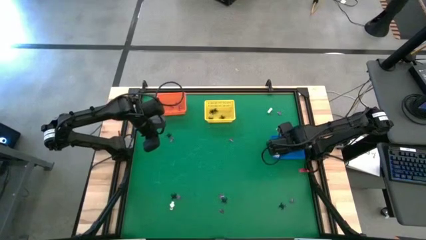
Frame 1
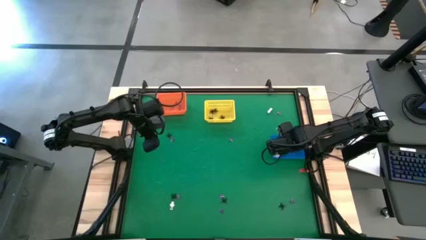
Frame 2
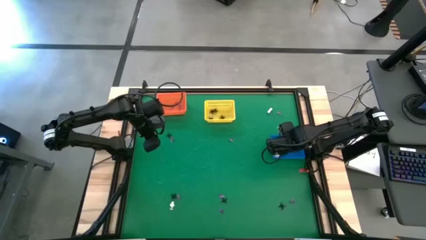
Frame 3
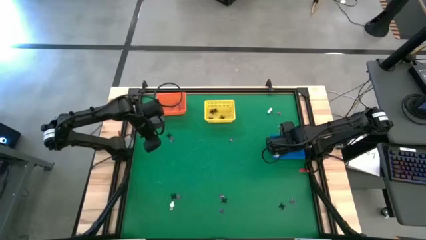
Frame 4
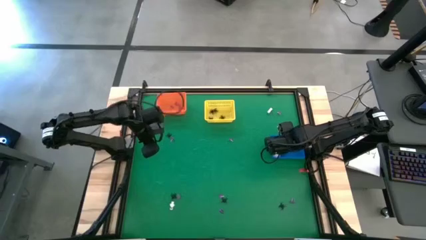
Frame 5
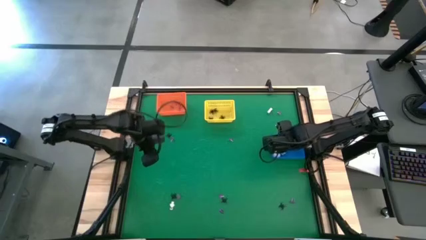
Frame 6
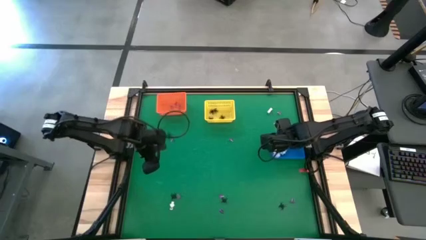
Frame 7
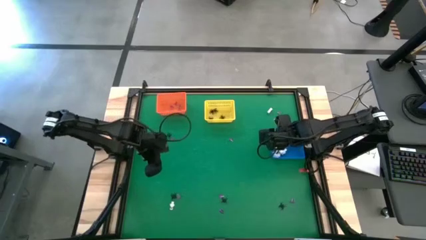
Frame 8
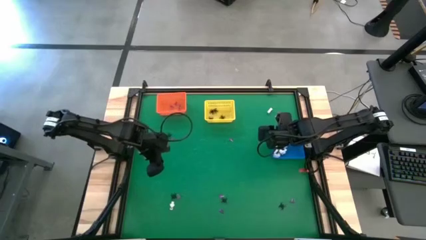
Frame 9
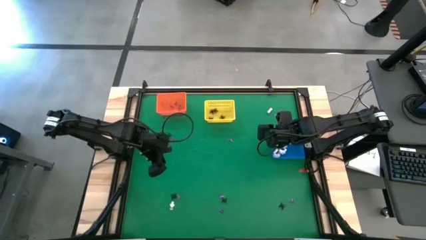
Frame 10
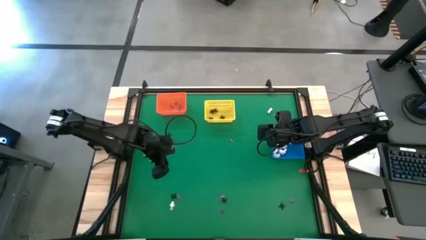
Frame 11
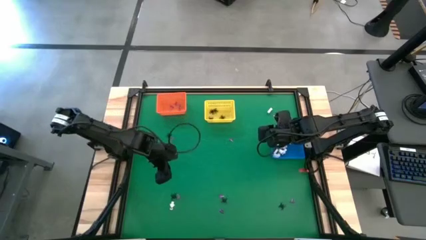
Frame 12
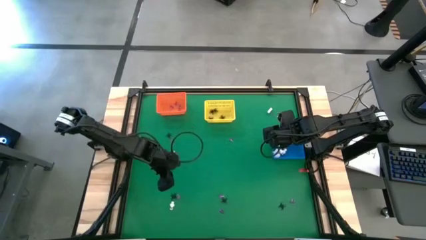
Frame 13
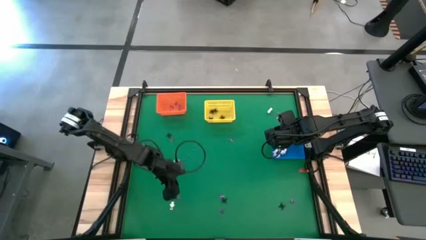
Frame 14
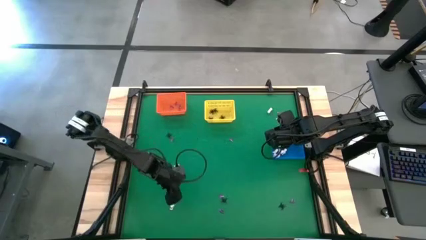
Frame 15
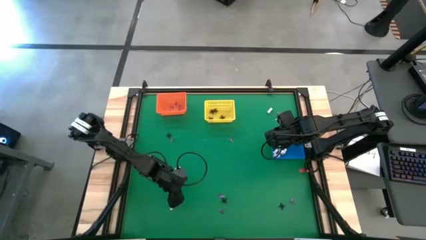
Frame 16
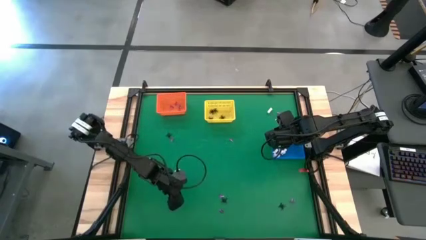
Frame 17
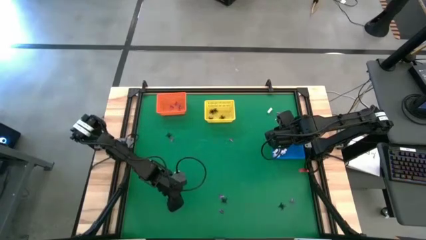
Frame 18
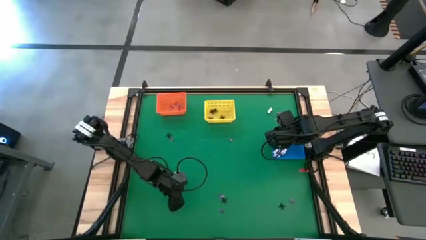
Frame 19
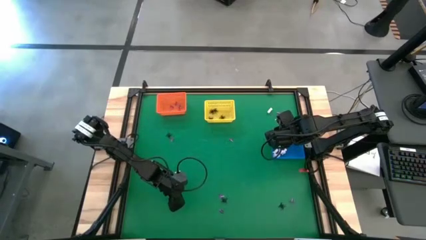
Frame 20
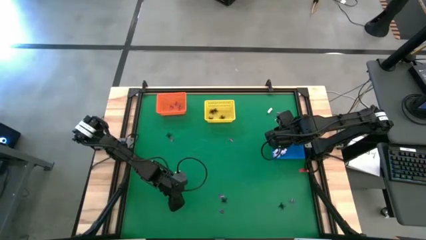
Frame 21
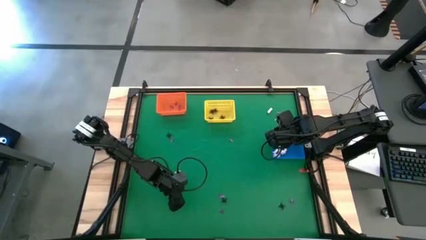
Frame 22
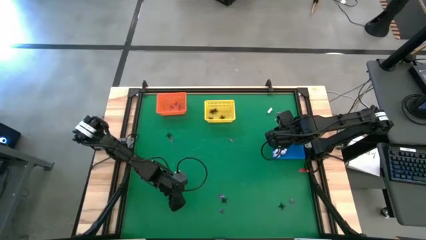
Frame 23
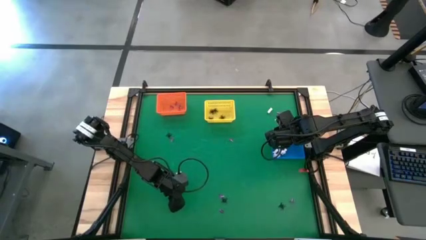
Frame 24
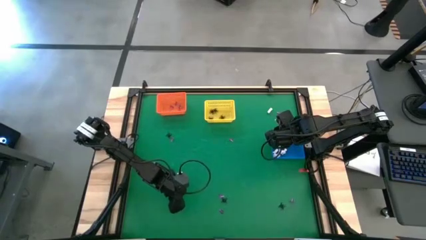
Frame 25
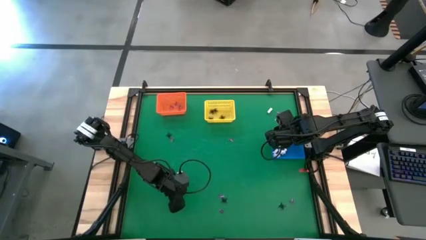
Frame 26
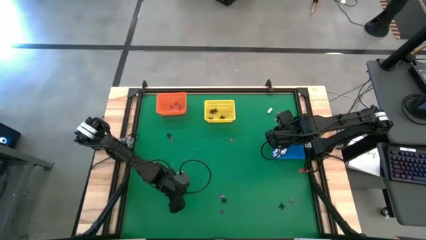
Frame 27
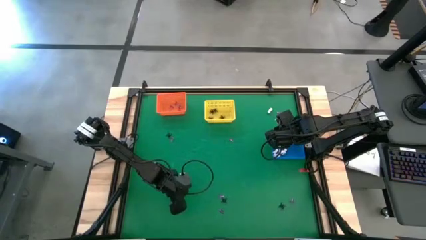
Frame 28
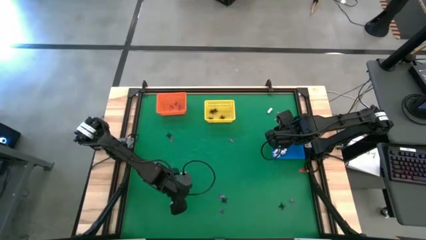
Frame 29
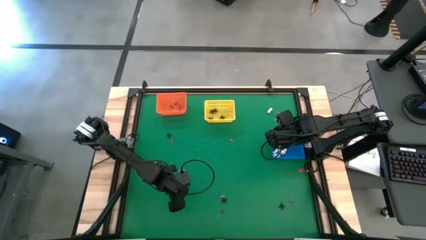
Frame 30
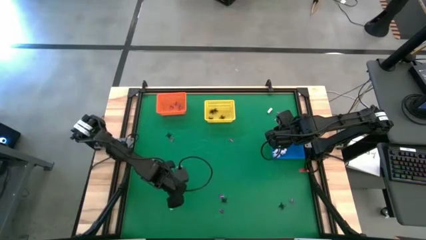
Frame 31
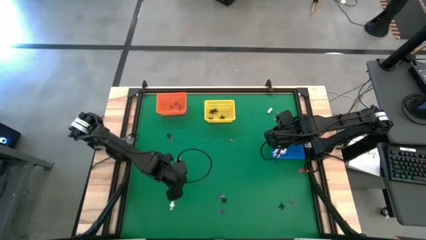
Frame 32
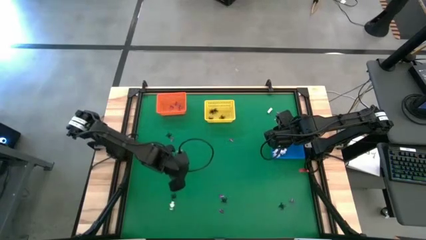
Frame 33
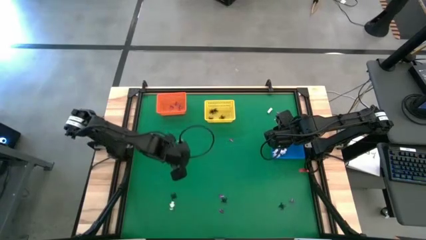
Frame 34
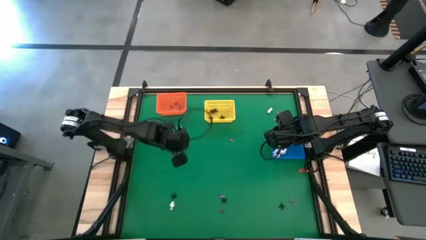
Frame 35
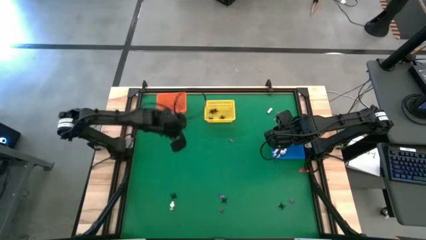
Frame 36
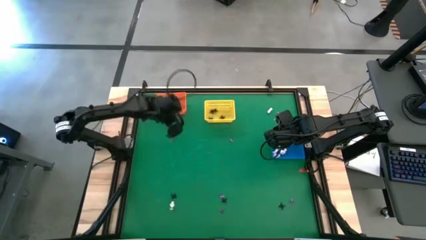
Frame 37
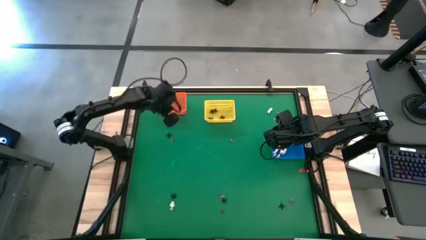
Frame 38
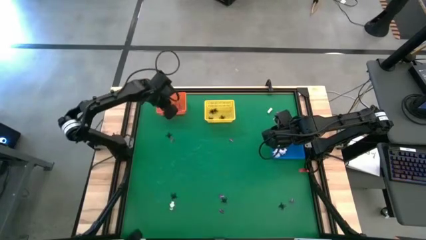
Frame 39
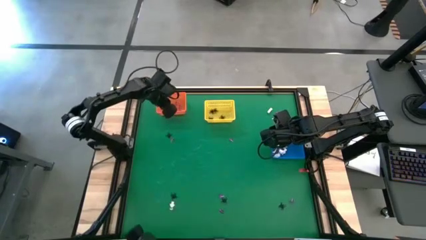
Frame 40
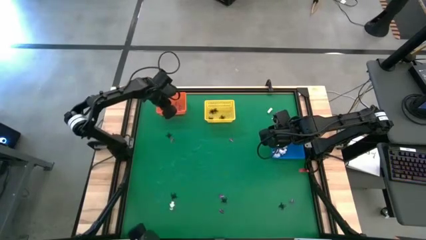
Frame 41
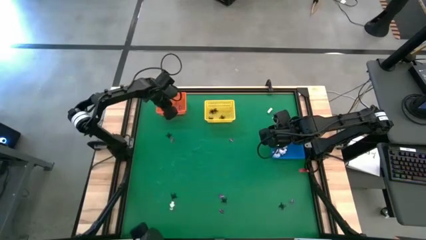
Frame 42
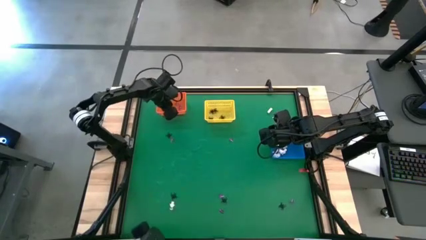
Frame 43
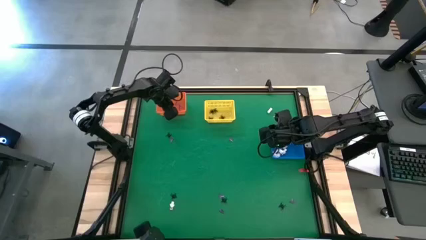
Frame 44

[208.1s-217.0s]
Task: Sort Halloween decoration
Put the violet skeleton toy into the orange basket

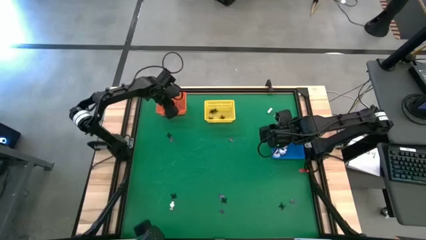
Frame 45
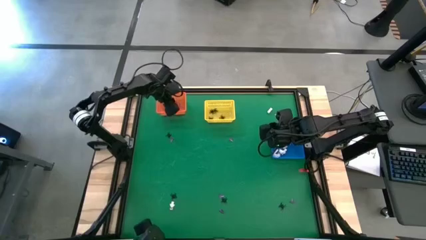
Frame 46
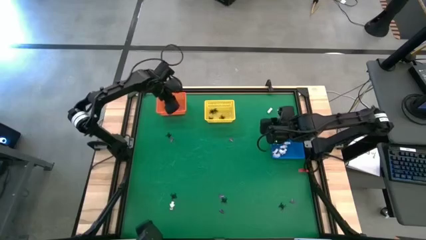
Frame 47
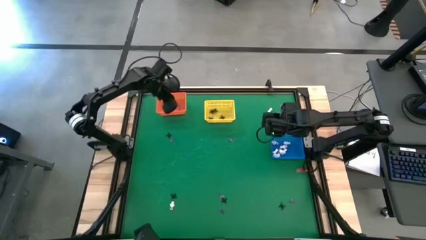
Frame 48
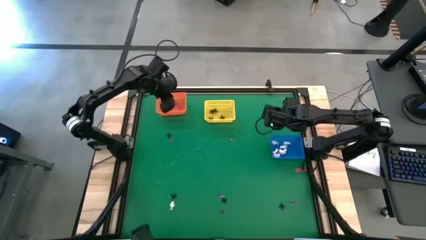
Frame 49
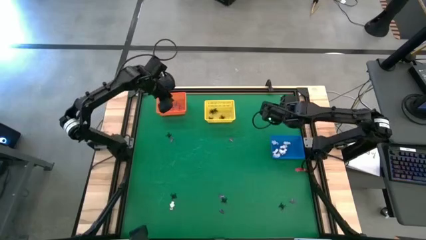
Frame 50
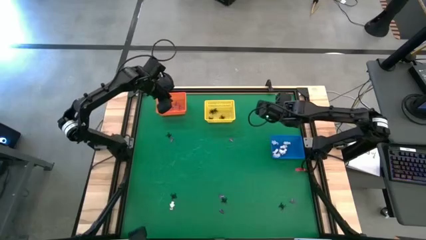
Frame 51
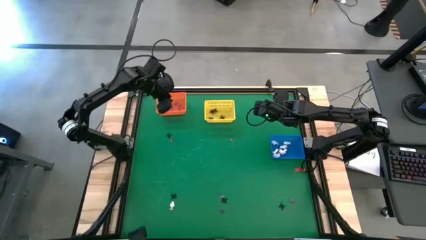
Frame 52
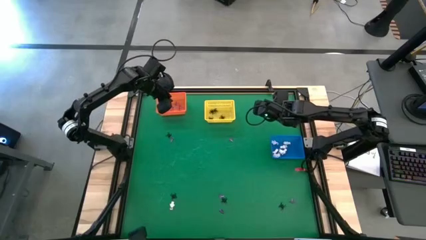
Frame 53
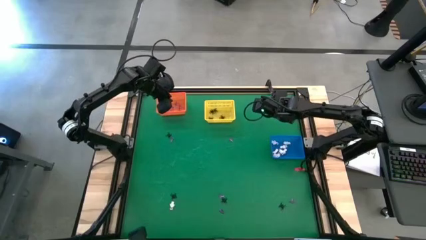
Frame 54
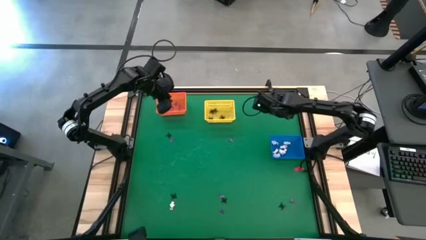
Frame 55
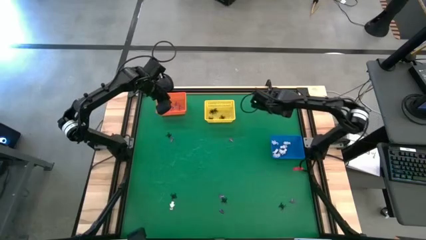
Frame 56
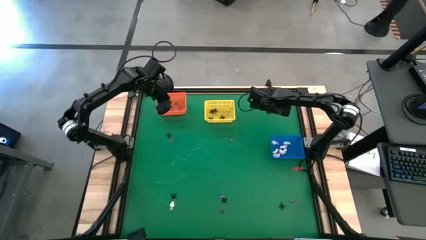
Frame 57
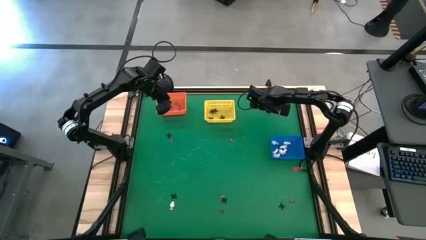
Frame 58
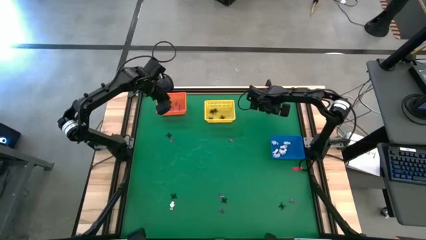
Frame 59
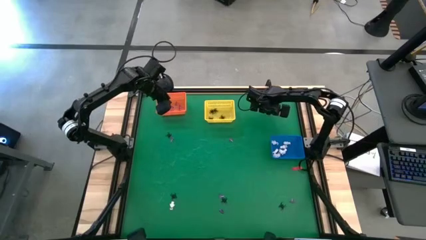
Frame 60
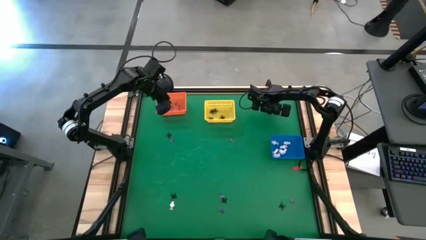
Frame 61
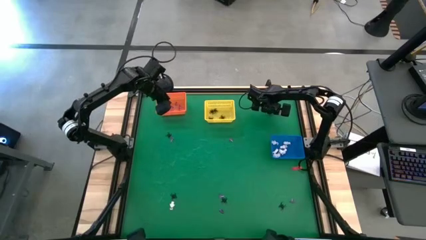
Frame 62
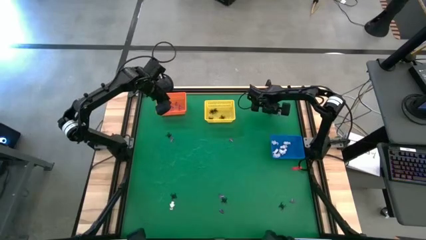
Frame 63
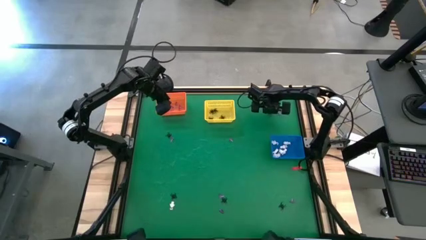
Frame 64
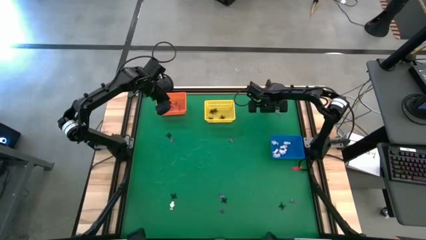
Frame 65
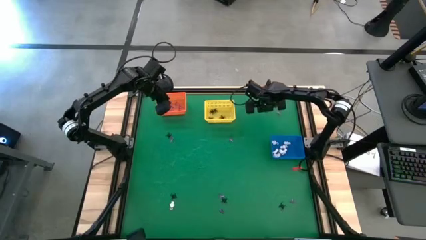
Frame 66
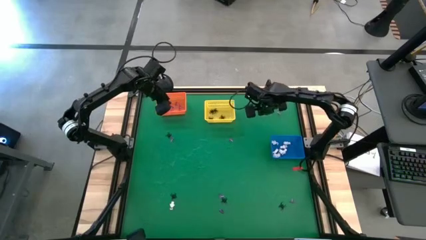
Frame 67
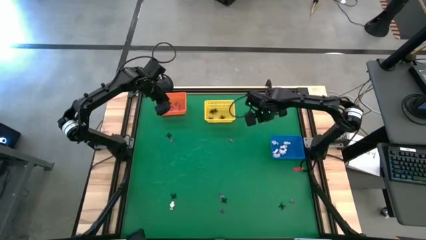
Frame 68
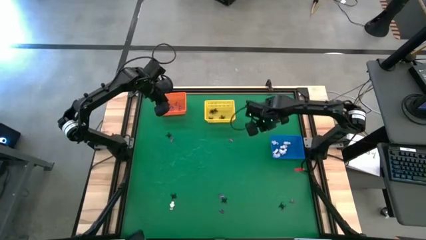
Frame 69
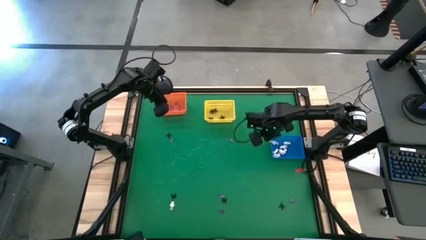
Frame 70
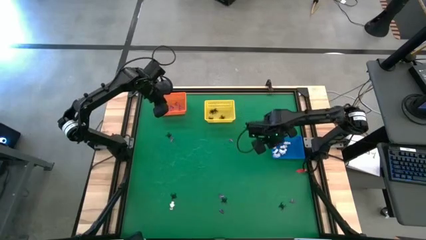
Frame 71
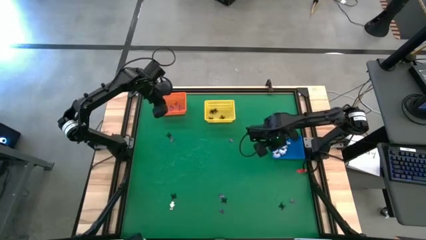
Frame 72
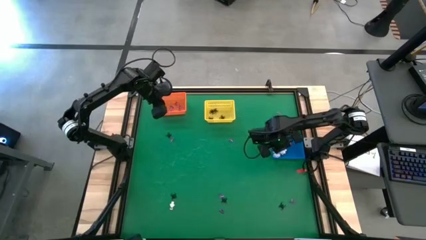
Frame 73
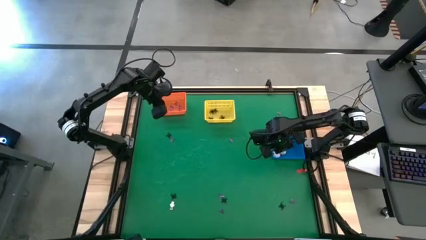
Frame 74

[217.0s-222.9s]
Put the white skeleton toy into the blue basket

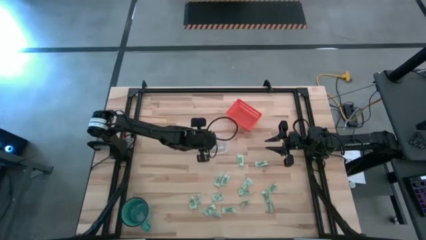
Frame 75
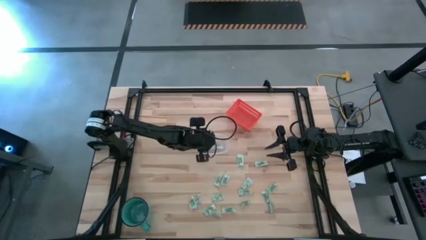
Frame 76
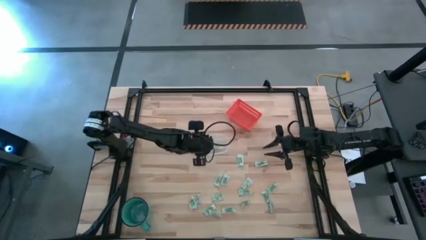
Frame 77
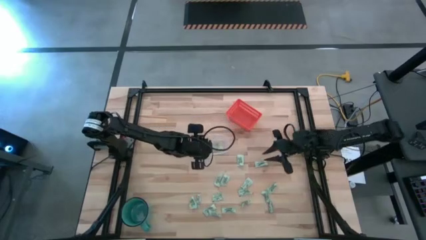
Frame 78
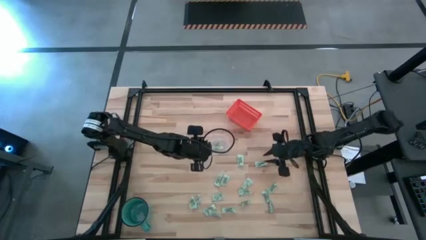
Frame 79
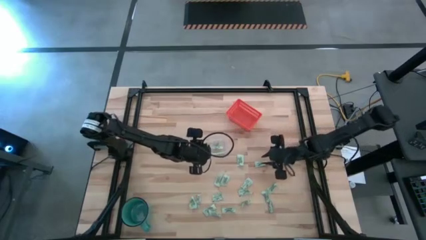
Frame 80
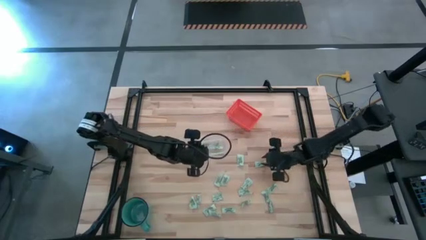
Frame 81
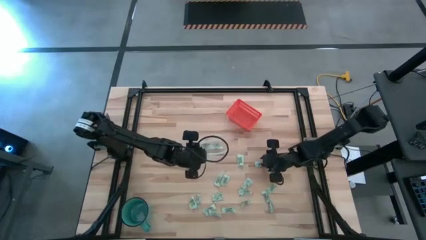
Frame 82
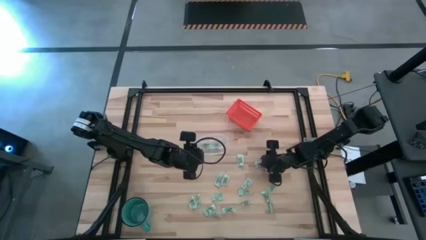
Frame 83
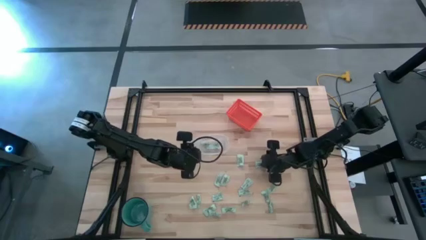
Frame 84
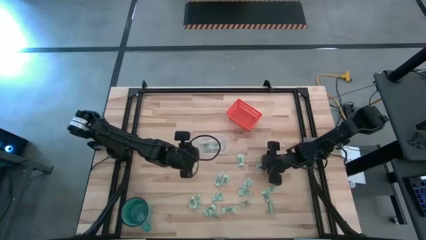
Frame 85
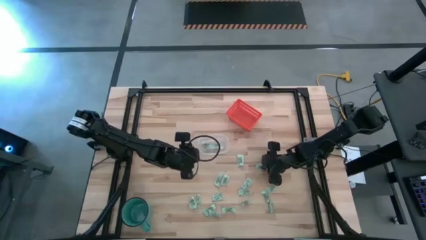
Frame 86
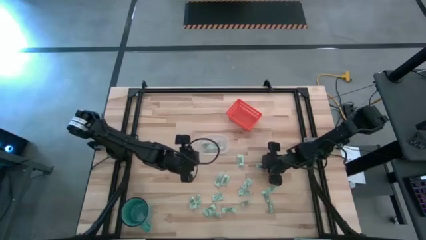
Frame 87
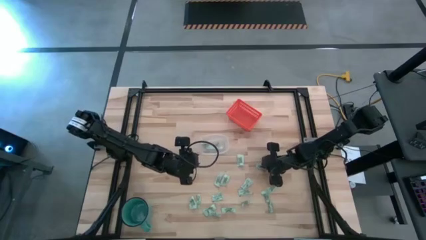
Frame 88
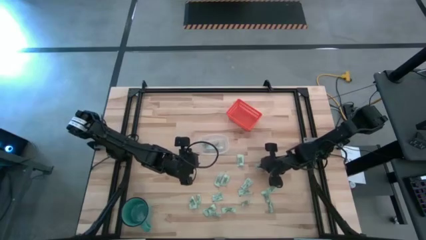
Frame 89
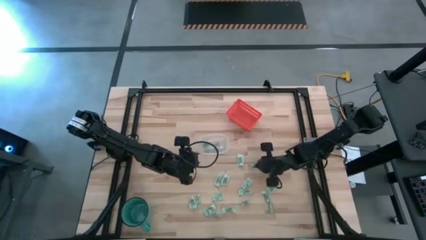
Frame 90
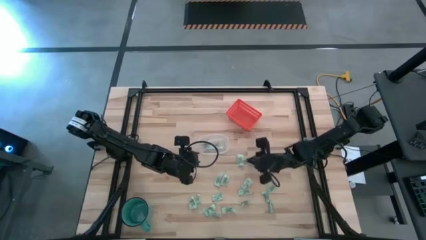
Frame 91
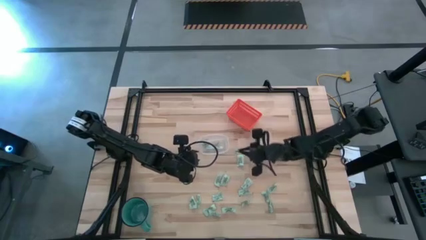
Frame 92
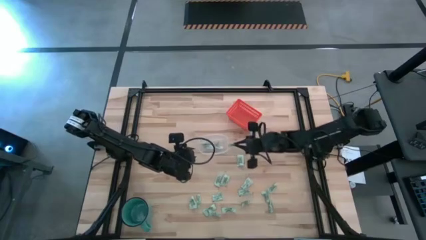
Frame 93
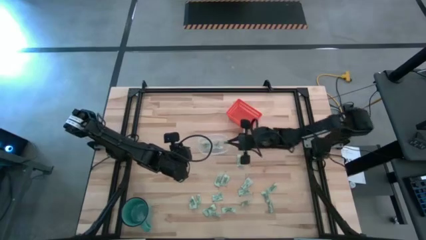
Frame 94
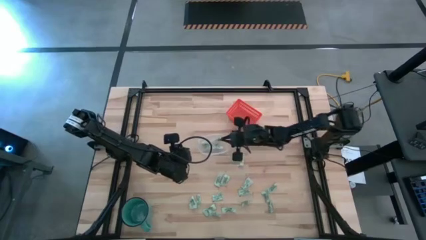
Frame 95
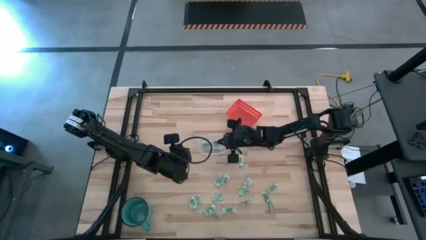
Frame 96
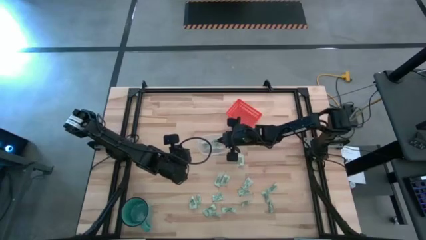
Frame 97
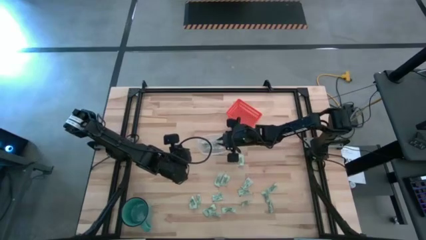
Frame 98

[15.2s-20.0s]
Task: Pick and place items into bin
Put the stevia packet into the transparent bin
